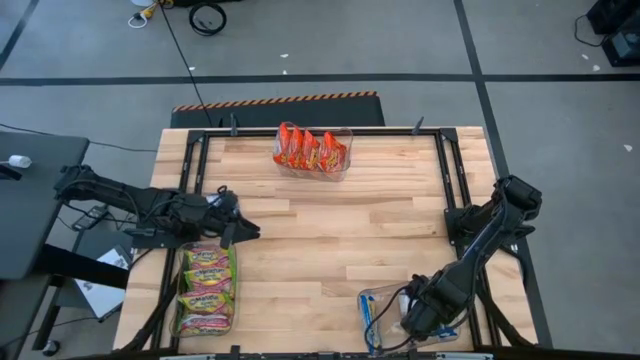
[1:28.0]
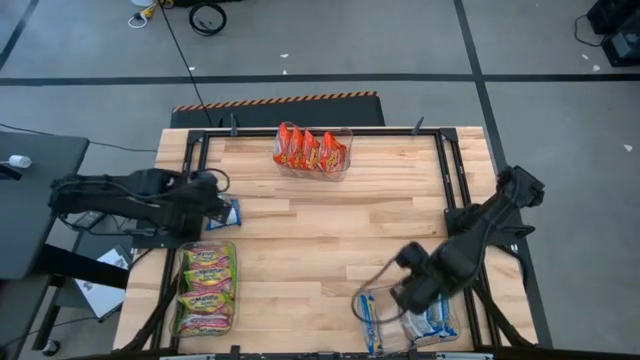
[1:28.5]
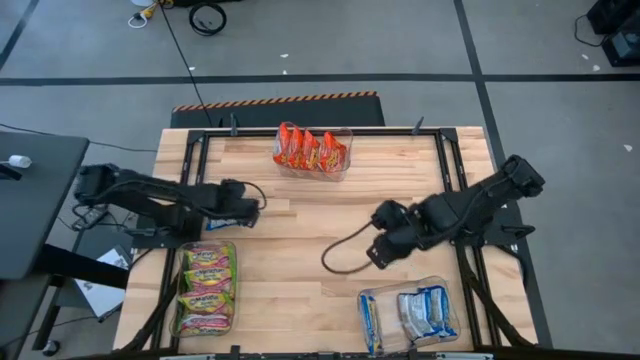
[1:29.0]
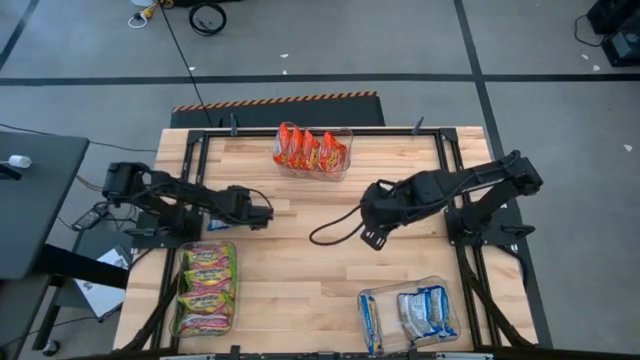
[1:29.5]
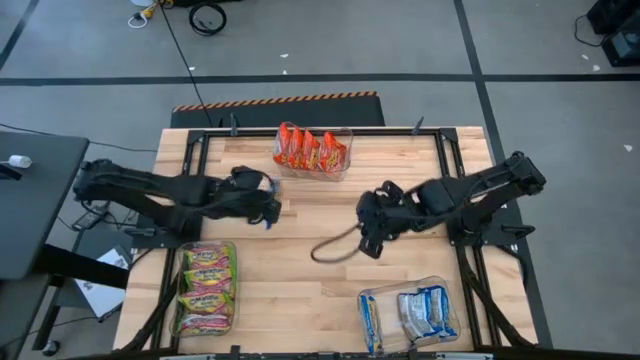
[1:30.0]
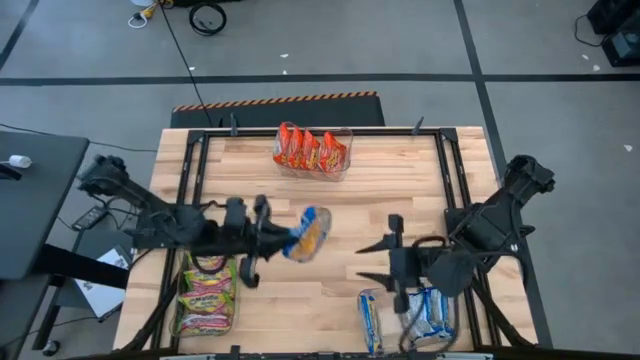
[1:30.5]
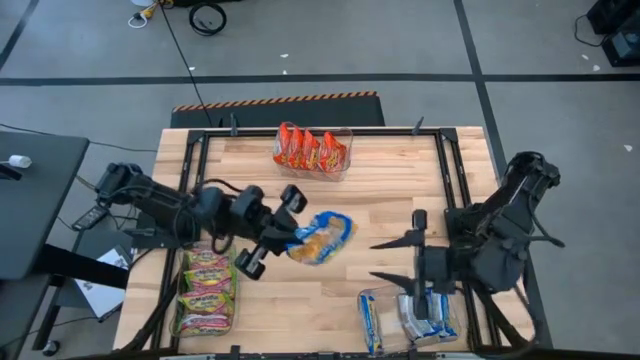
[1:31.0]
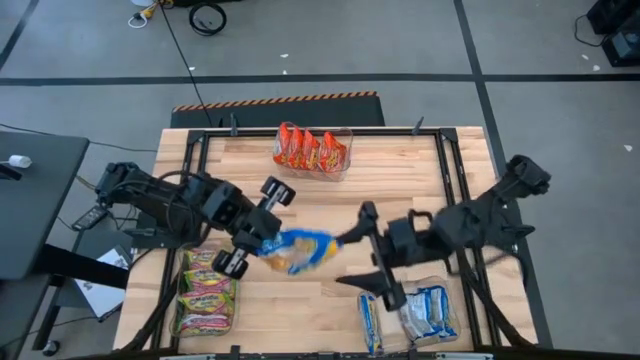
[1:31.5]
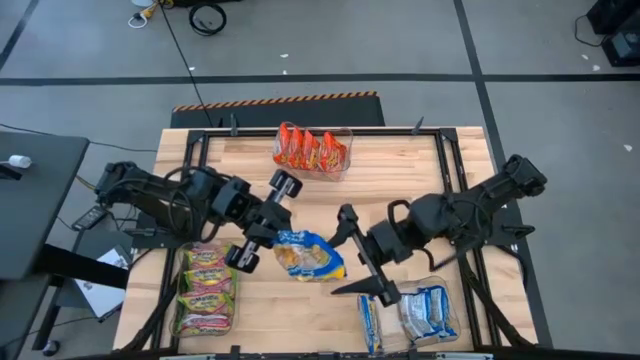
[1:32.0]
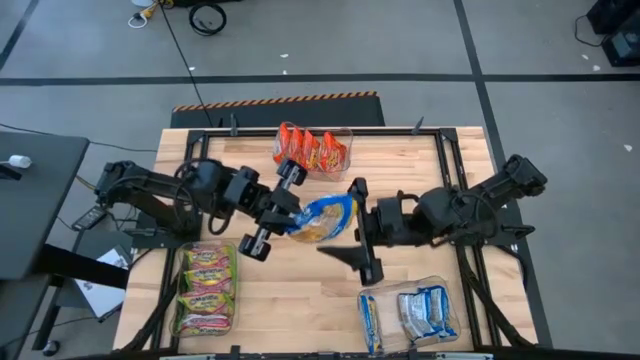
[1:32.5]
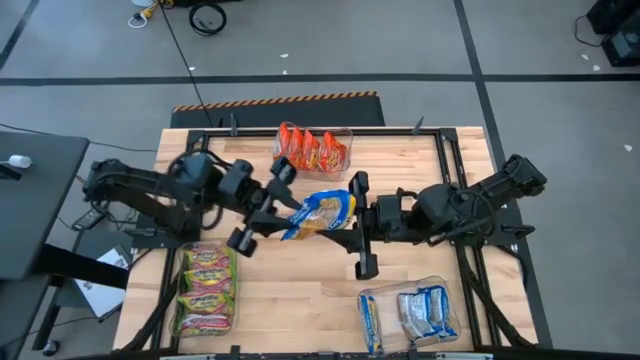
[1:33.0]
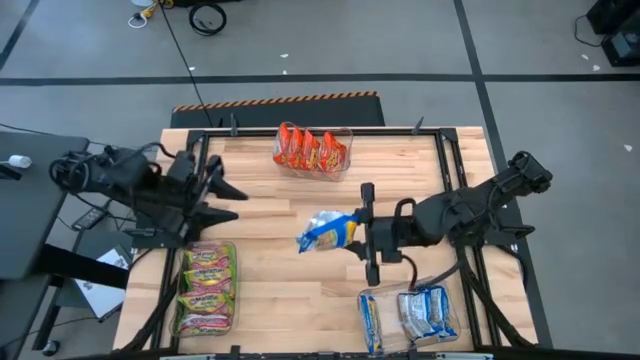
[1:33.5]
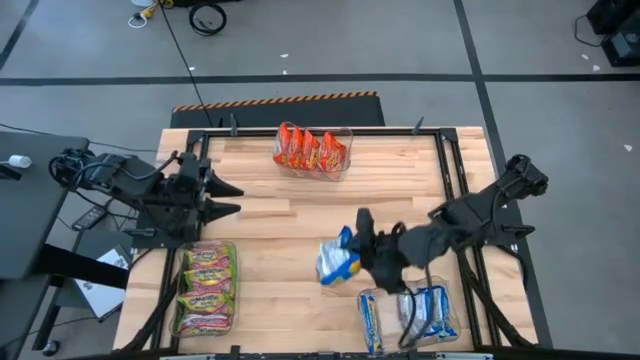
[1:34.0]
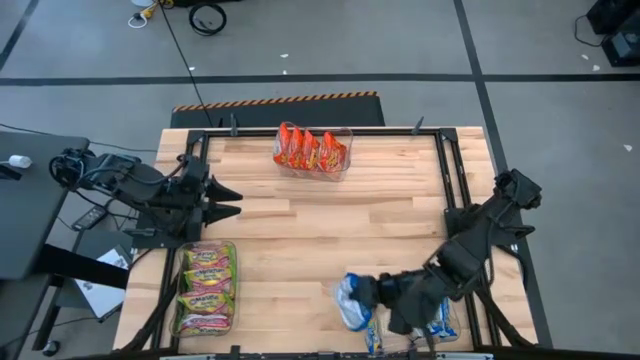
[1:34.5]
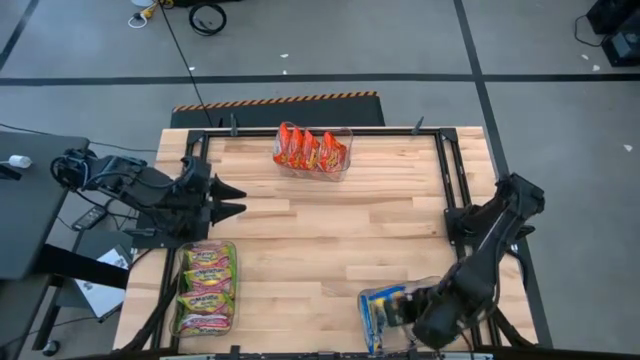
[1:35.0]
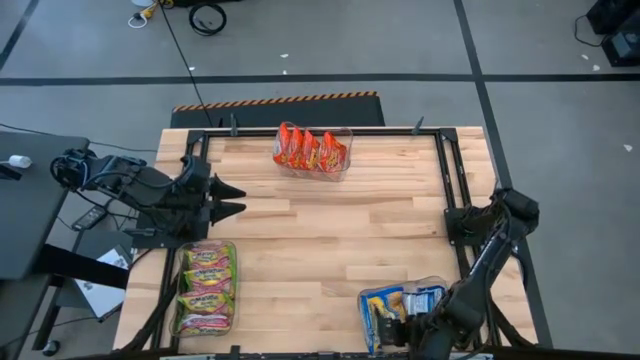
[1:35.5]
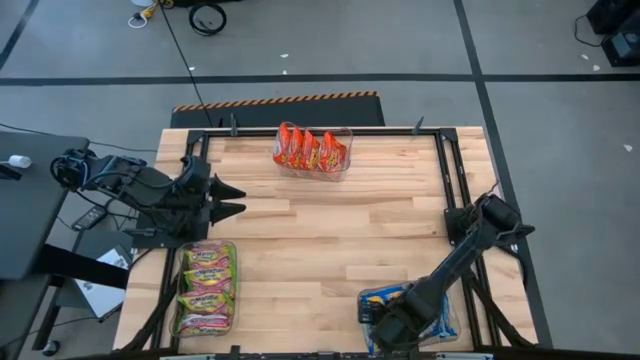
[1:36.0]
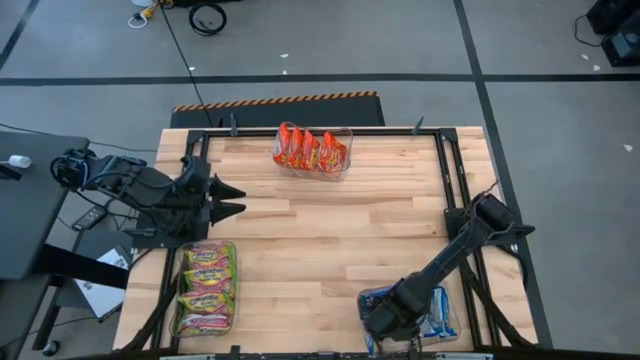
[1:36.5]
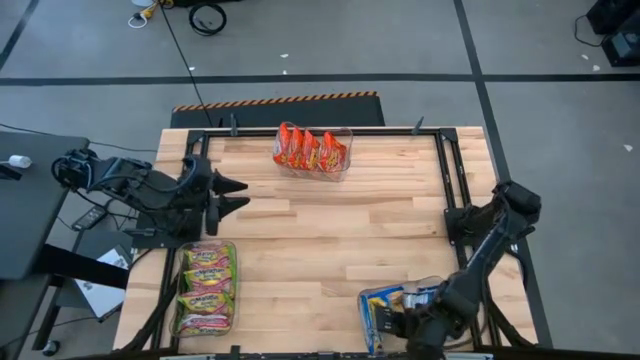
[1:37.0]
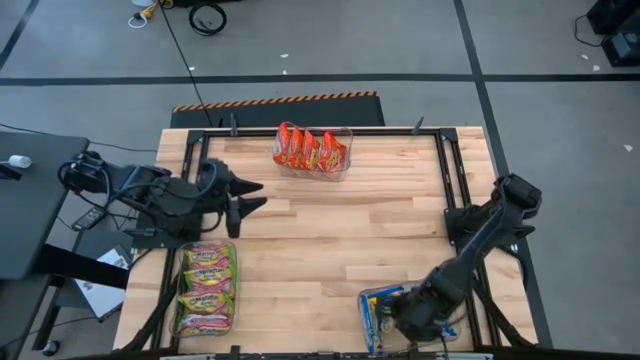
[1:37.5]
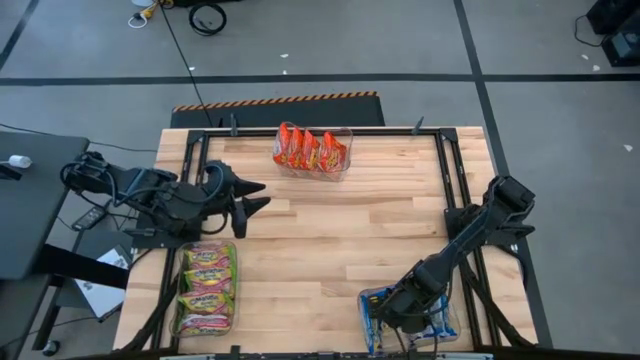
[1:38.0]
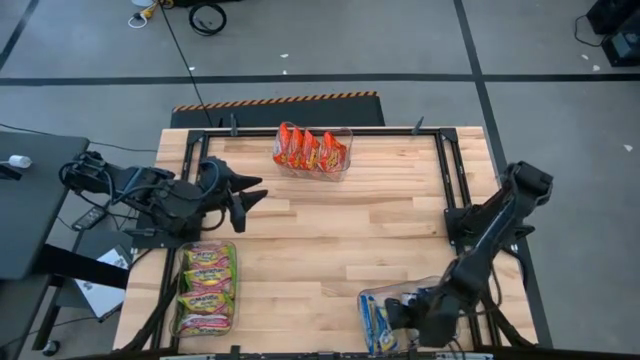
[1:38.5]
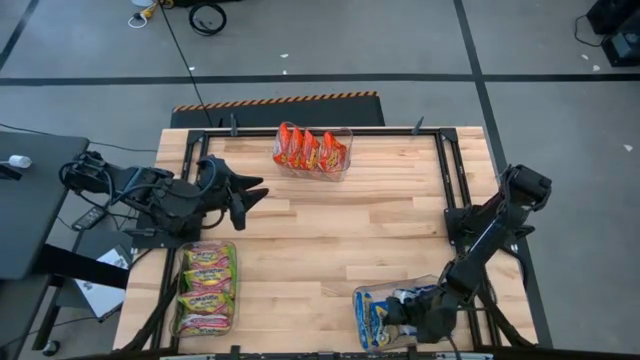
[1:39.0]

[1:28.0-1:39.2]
Task: Sort Maruchan noodles
Put the blue noodle pack into the bottom right transparent bin

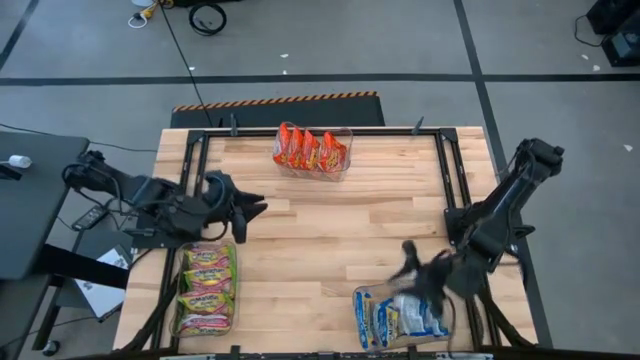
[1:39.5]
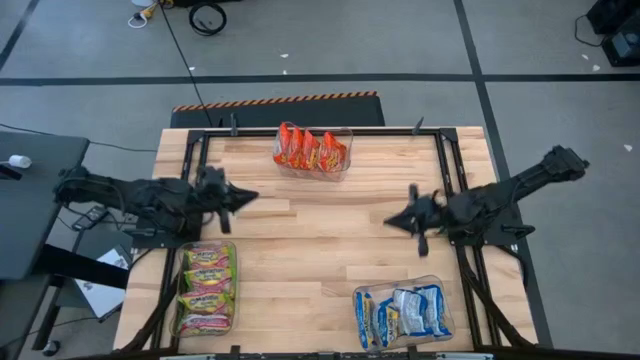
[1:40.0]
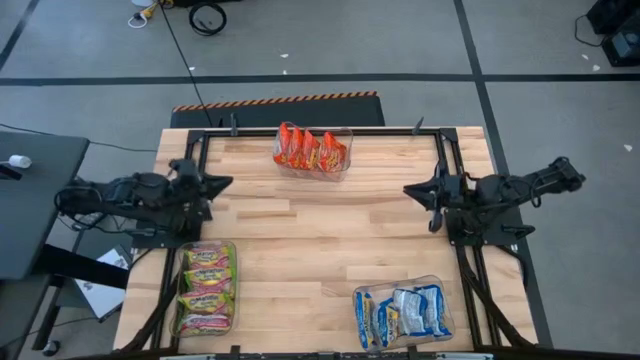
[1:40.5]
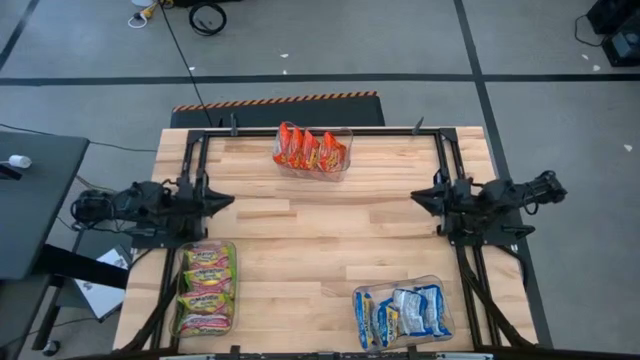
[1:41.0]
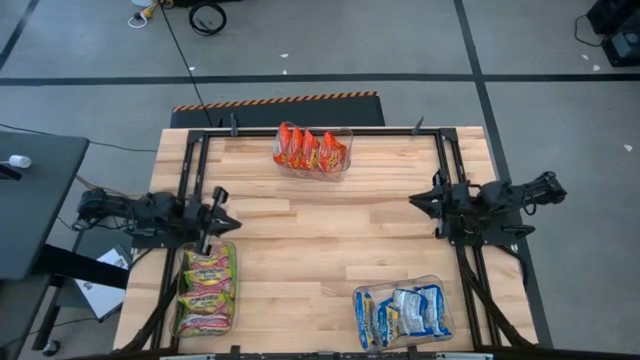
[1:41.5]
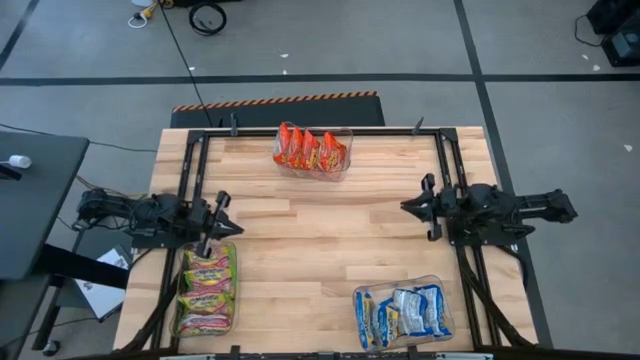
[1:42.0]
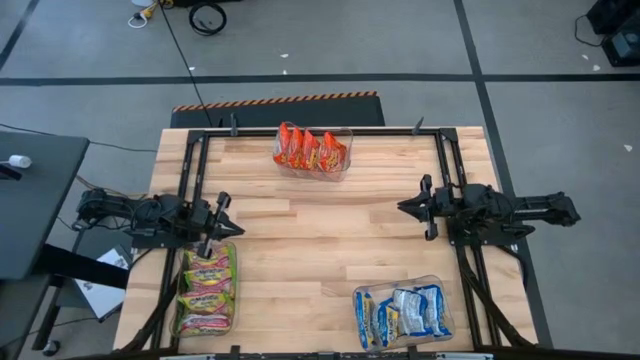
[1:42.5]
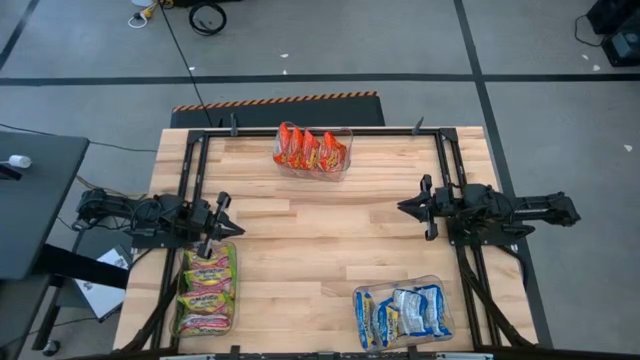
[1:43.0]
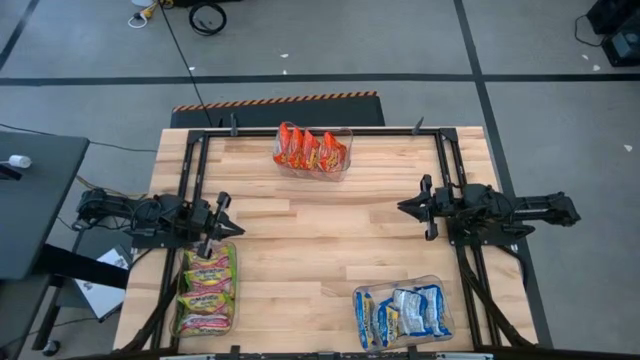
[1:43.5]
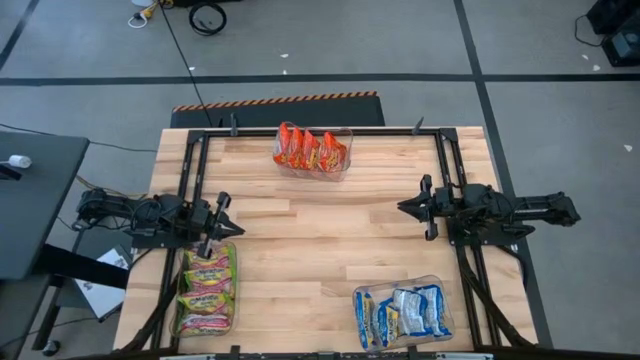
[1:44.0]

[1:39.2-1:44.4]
Return to Home Position

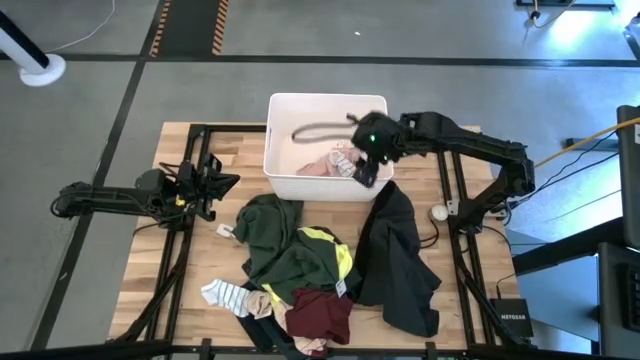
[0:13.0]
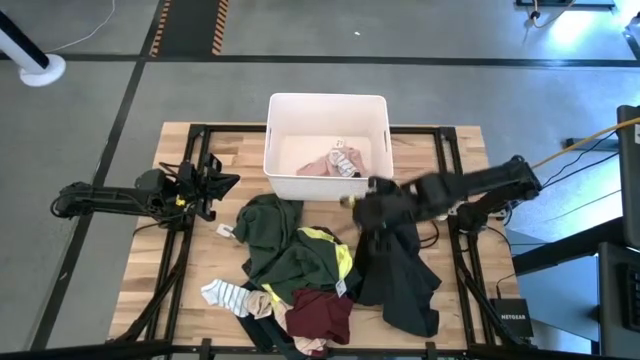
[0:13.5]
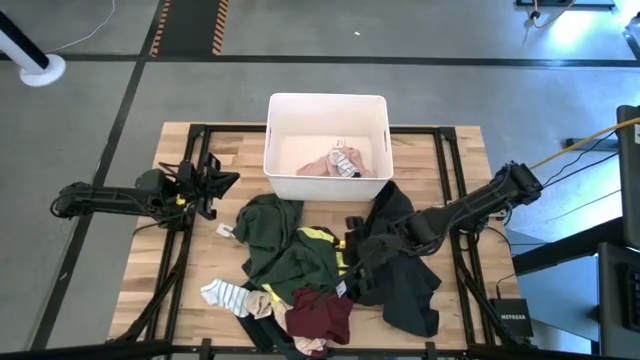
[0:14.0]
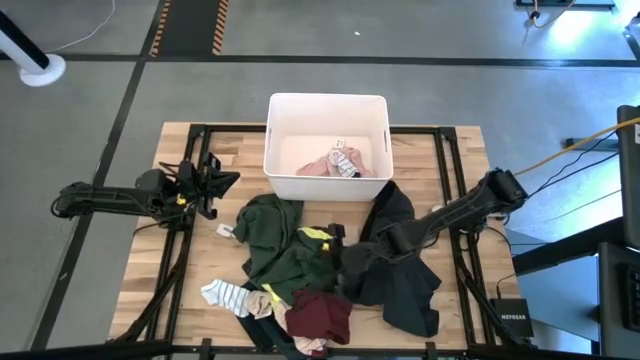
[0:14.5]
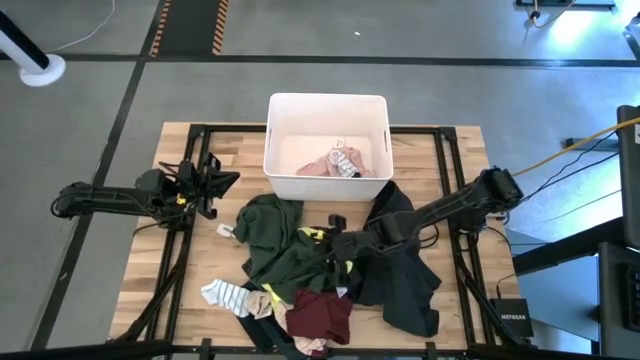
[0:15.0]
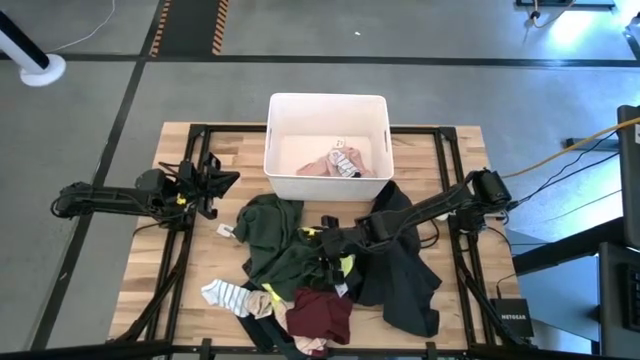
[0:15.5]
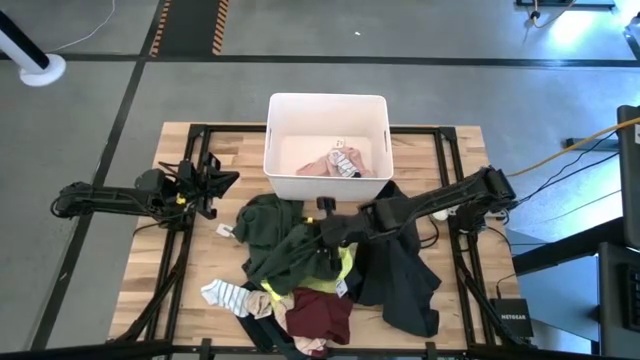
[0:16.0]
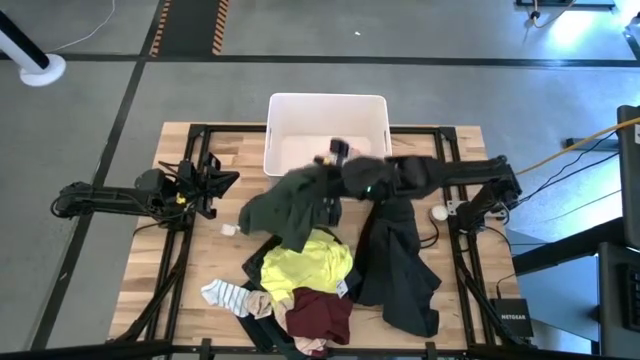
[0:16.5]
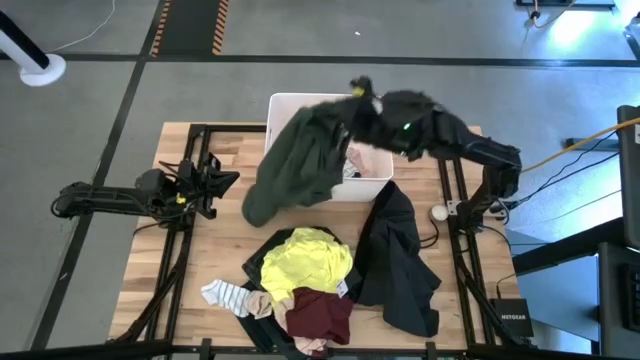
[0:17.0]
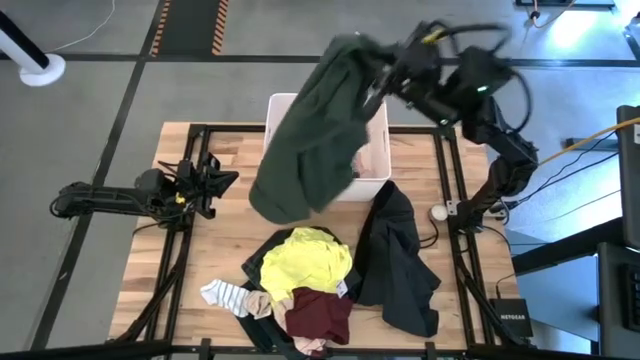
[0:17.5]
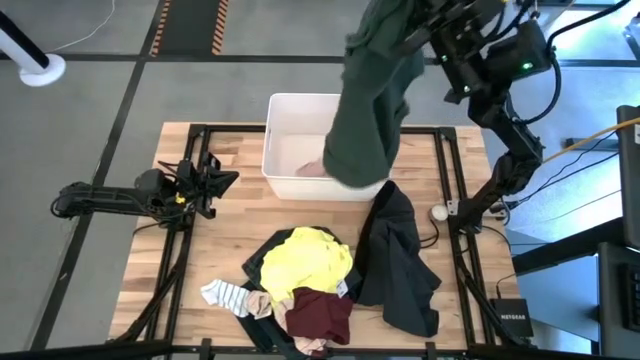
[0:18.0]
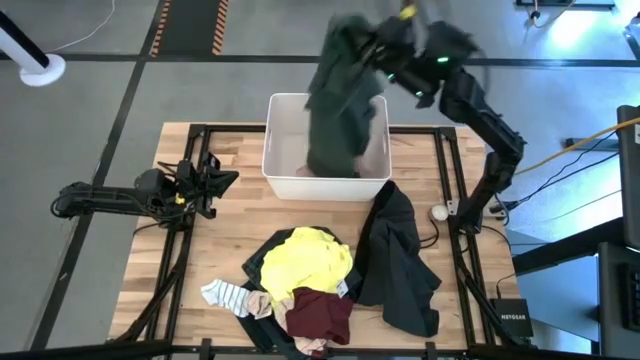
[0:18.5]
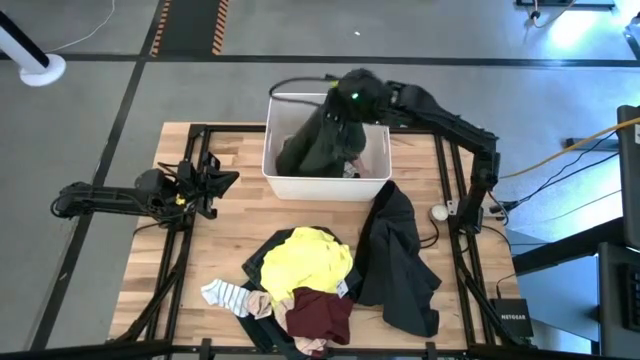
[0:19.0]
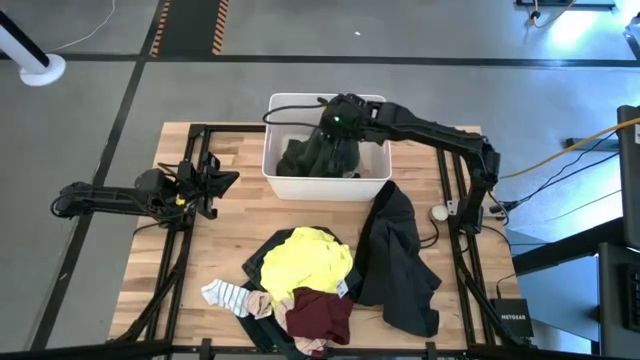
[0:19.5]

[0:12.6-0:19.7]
Task: Sort clothes
Put the green shirt into the white bin
